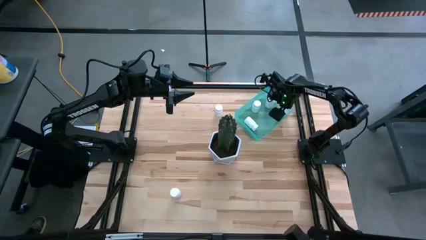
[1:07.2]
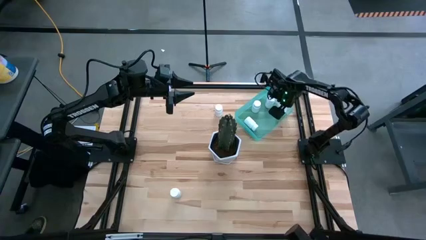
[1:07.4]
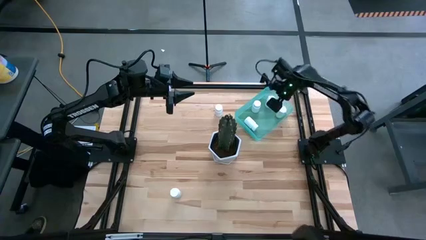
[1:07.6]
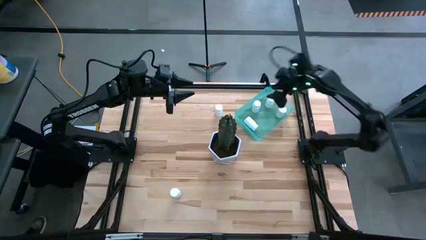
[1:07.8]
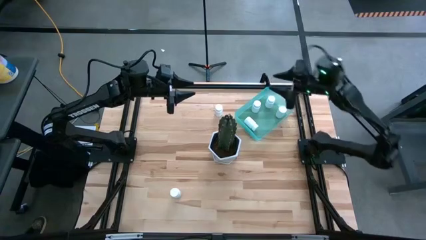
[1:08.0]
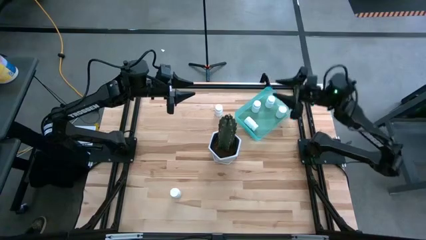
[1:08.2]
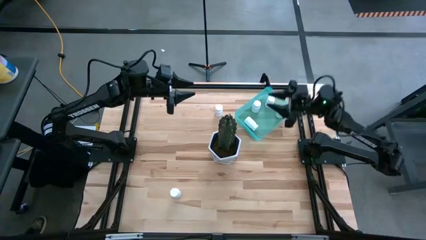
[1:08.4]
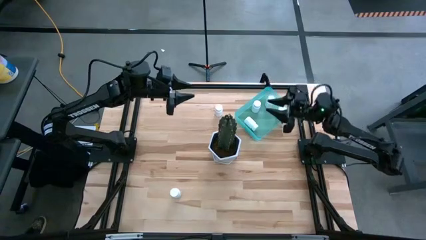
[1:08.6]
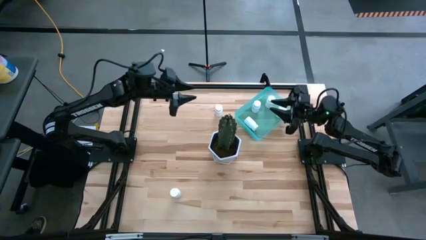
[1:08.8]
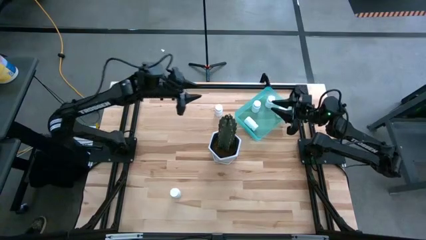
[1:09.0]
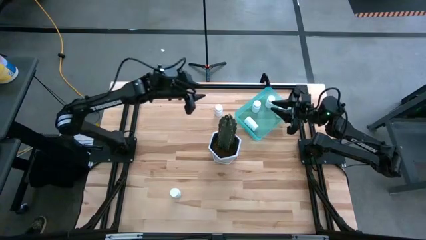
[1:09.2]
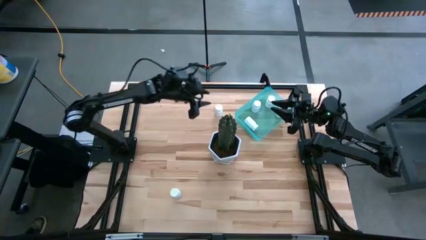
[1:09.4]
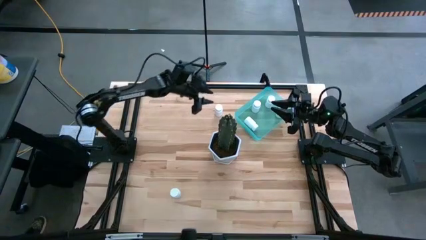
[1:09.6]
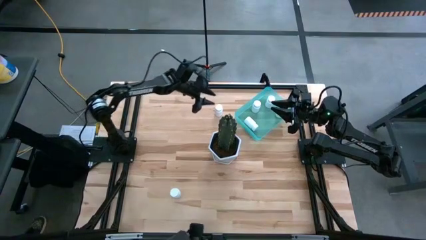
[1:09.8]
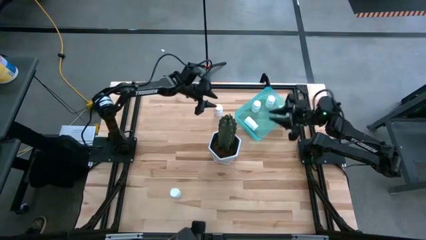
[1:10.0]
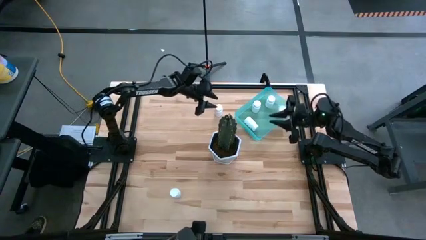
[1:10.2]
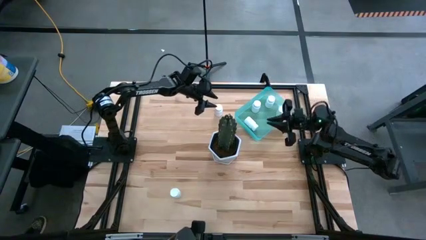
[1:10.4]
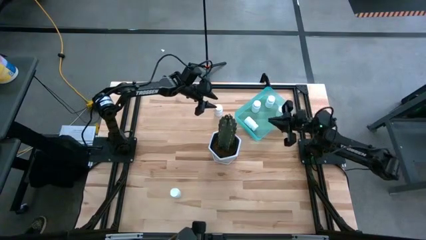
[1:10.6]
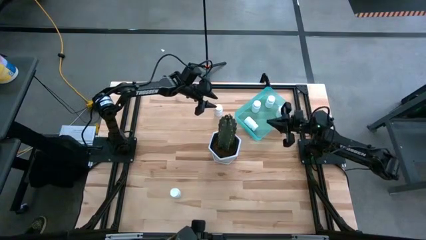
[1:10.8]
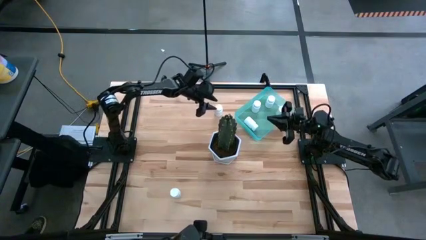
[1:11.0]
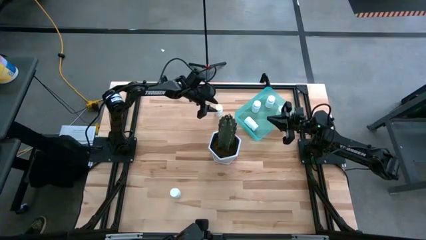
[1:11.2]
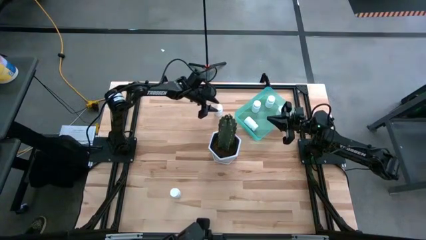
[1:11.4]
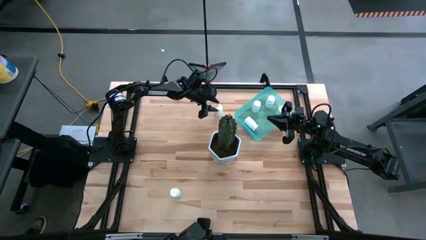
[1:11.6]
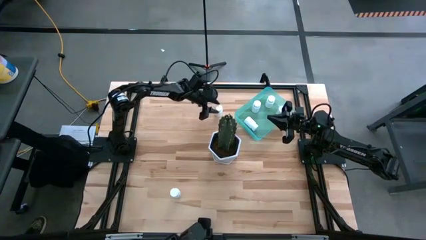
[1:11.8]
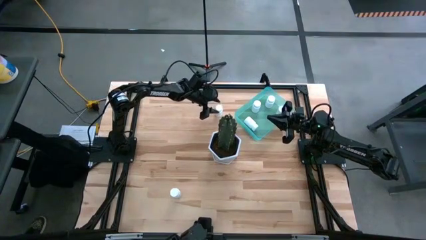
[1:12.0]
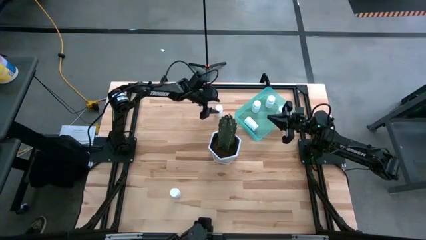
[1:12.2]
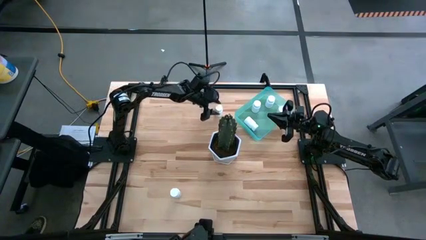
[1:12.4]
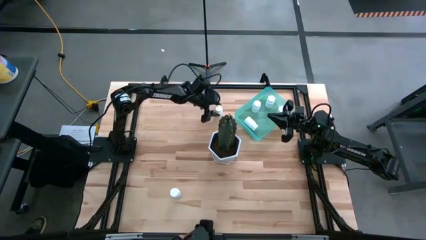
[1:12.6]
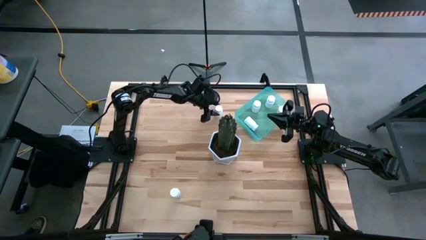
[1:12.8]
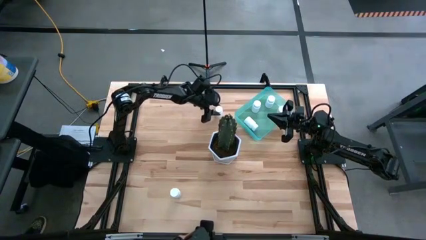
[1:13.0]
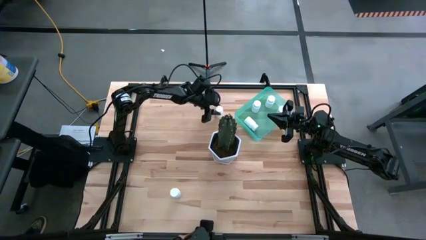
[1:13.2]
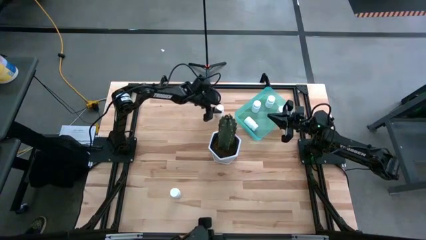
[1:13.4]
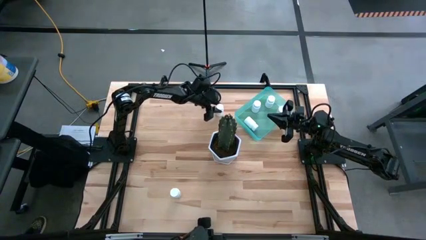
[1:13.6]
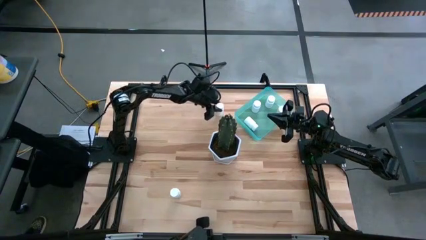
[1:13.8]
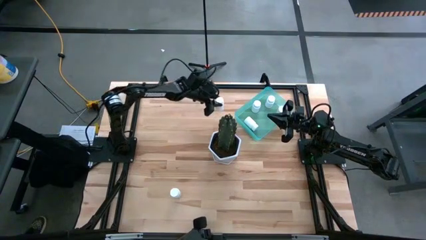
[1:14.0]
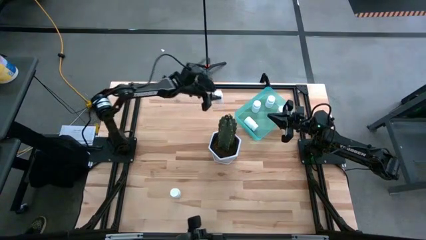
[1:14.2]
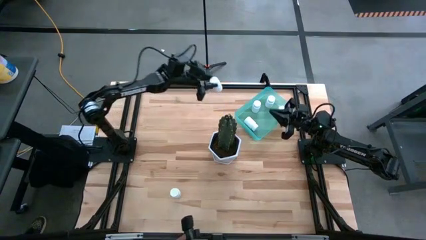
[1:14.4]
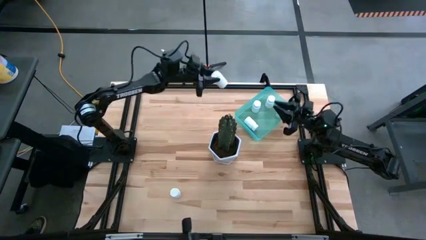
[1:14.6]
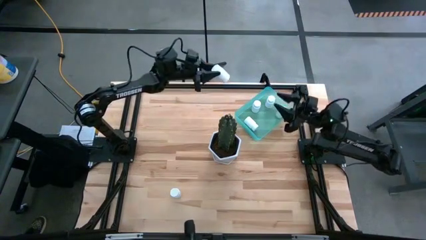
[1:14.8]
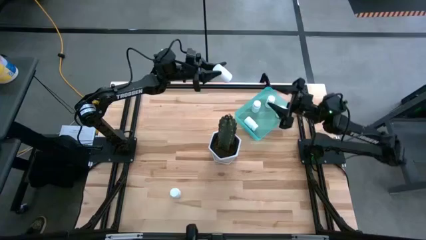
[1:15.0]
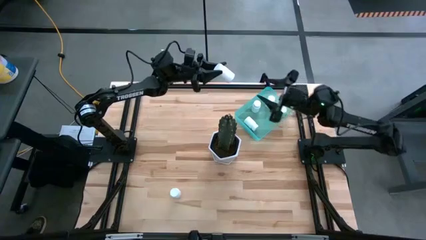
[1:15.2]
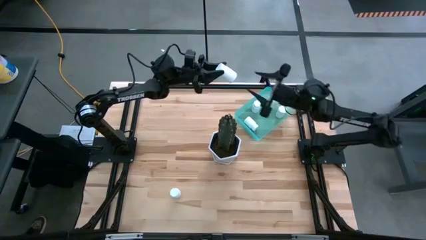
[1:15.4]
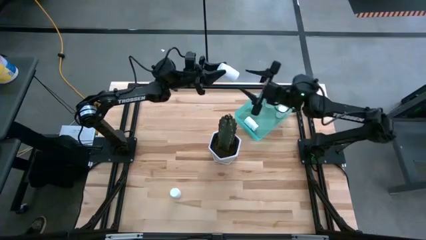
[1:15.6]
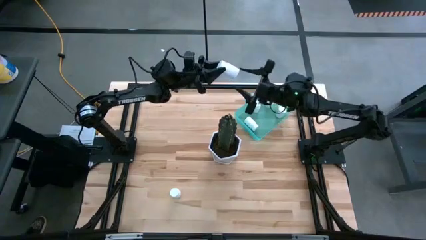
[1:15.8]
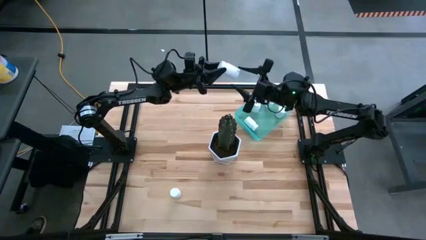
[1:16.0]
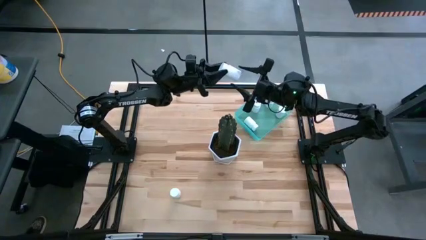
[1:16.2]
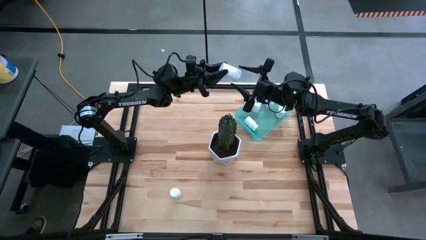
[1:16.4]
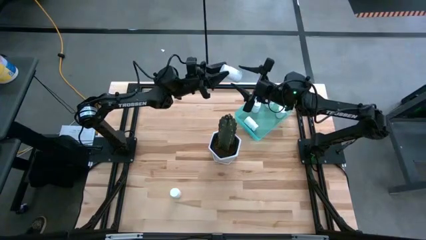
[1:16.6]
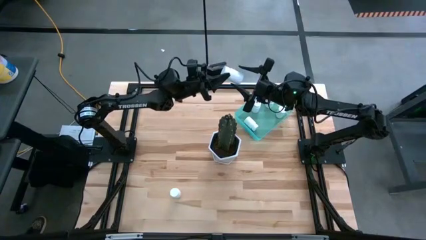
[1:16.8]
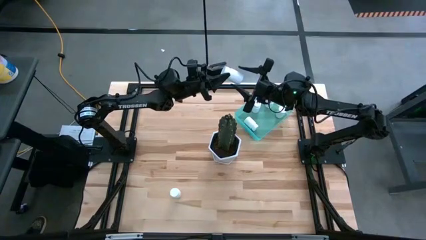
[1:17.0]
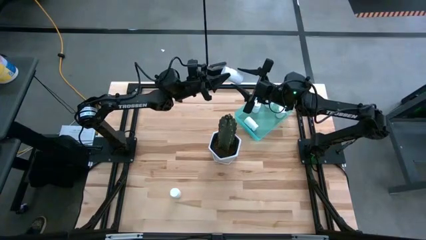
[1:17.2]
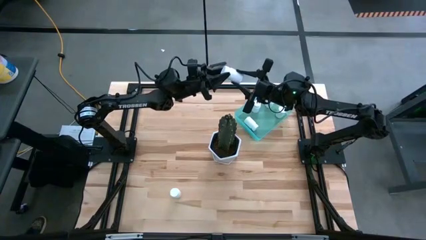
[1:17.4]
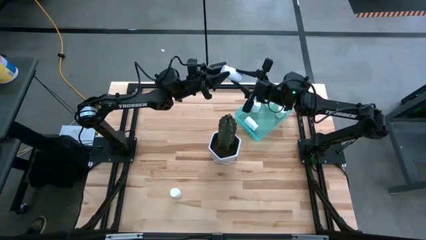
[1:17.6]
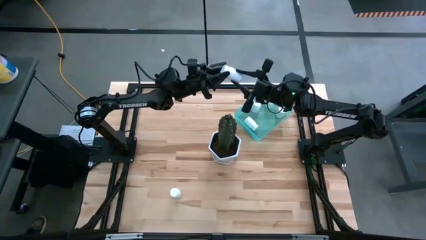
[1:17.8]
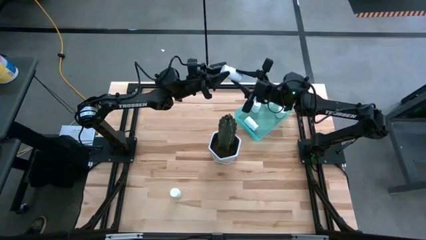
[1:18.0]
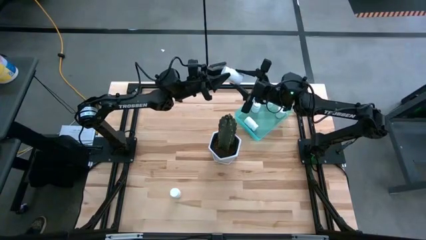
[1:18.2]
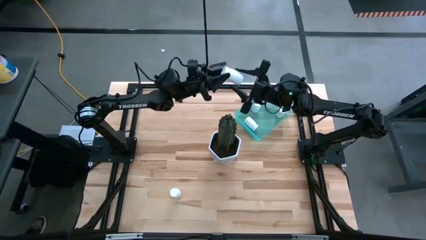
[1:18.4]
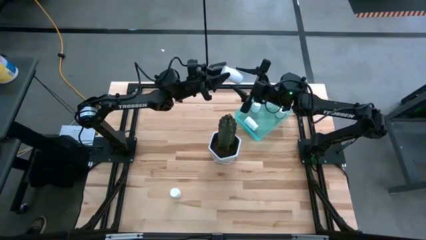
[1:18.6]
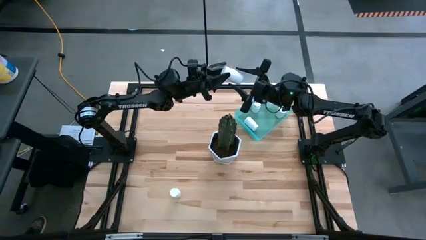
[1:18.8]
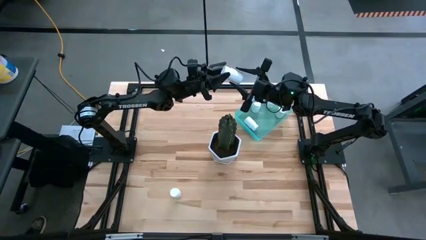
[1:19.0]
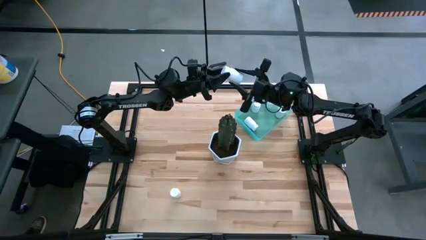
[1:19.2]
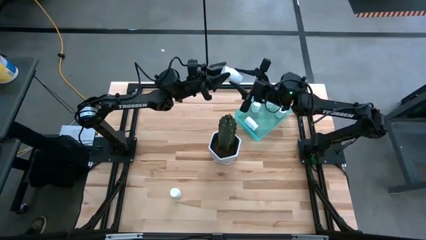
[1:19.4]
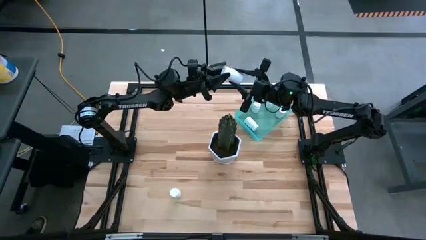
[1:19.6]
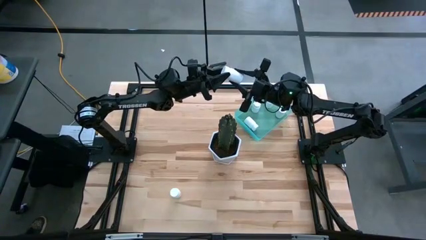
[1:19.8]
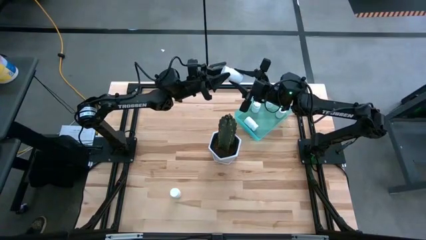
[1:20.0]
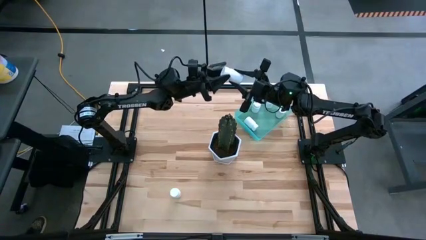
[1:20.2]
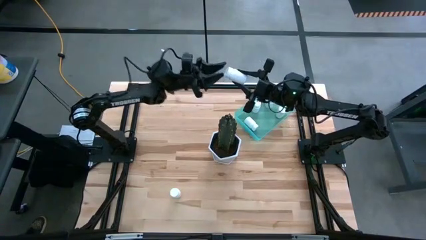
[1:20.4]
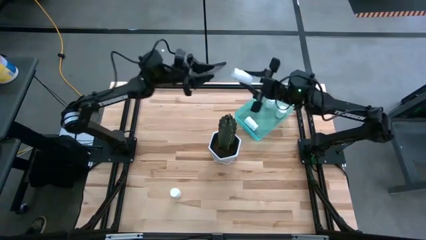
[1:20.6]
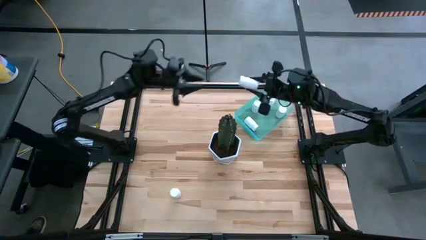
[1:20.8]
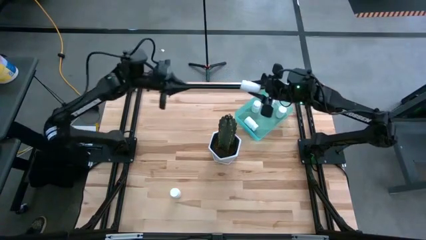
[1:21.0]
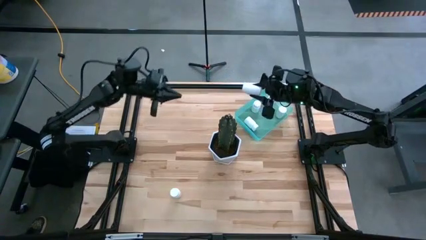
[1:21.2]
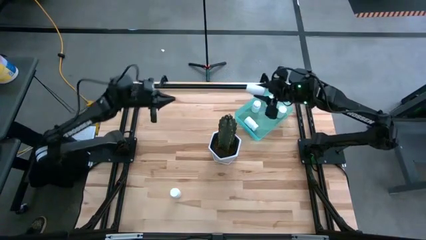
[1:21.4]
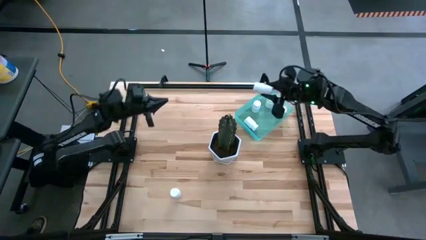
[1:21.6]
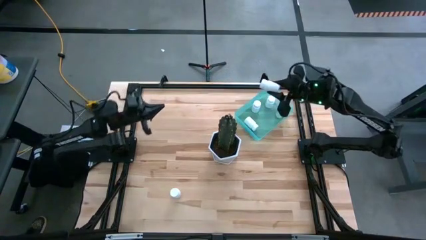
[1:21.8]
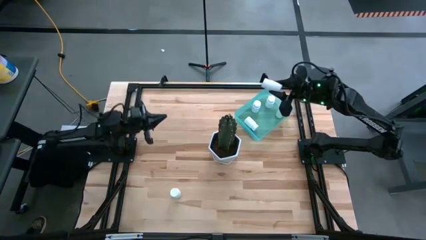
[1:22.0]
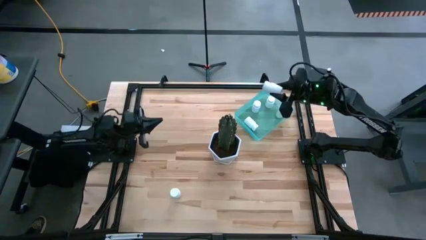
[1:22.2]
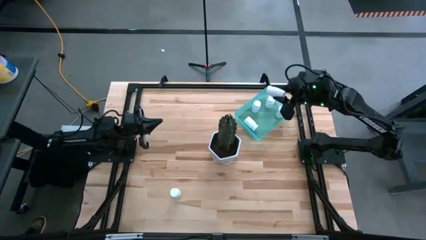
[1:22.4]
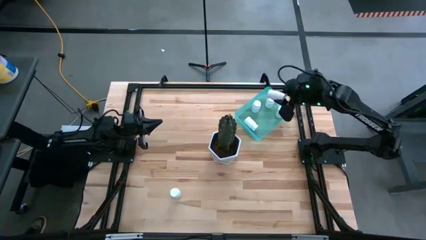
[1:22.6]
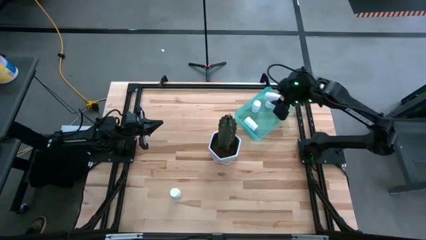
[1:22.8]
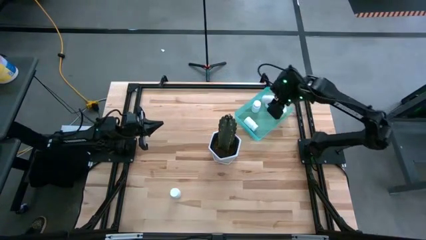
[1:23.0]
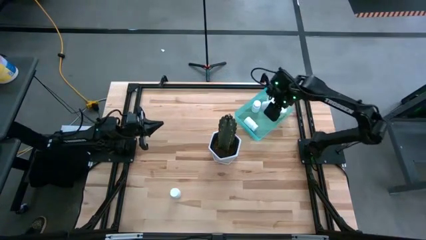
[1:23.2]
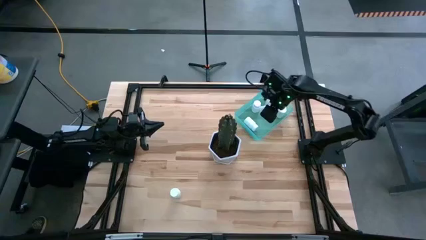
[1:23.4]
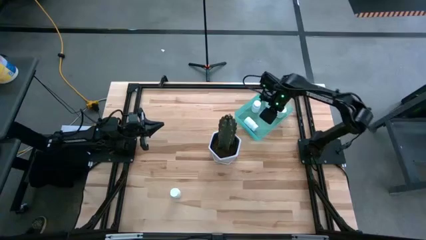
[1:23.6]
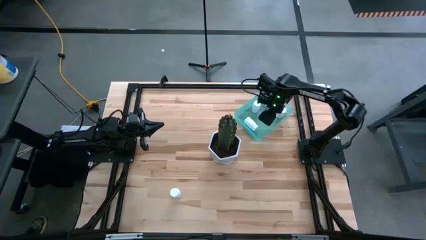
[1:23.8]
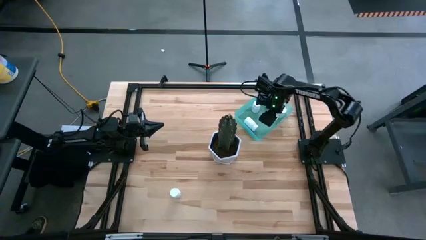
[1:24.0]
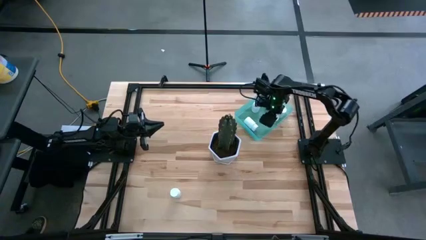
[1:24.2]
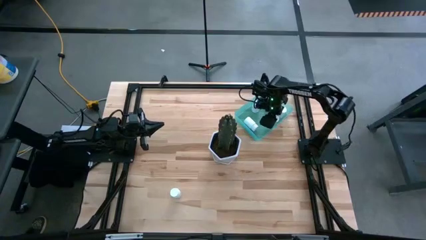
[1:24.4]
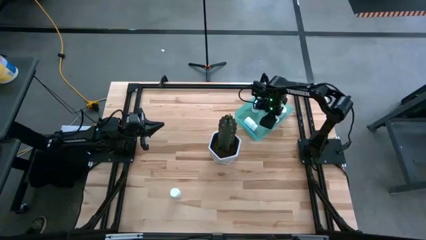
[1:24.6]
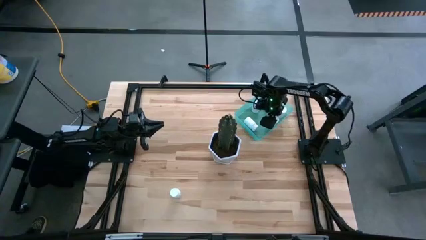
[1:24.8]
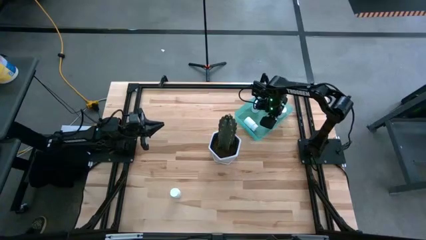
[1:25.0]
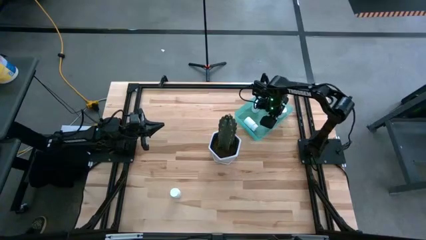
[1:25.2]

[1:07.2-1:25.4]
Task: Pick and place pill bottles into a basket
Put the white medicine bottle into the blue bin
